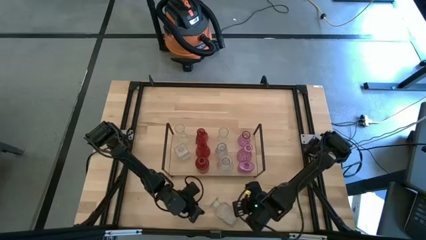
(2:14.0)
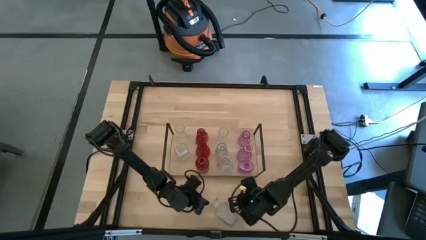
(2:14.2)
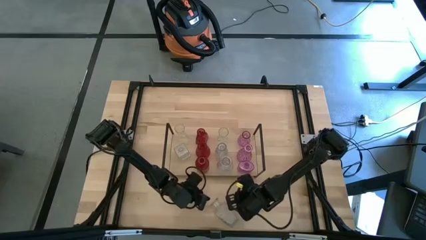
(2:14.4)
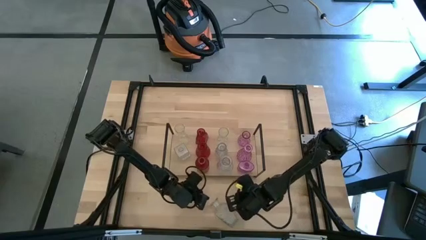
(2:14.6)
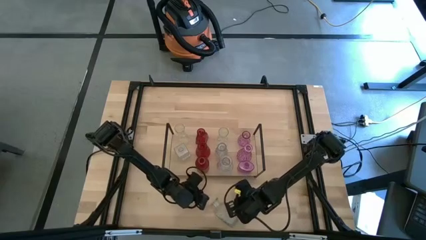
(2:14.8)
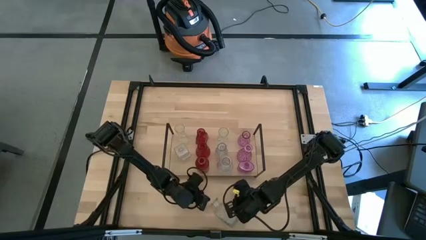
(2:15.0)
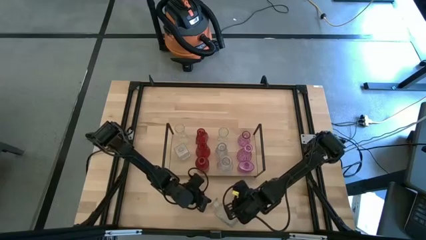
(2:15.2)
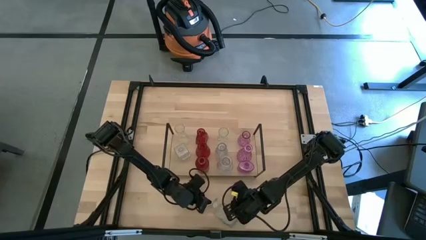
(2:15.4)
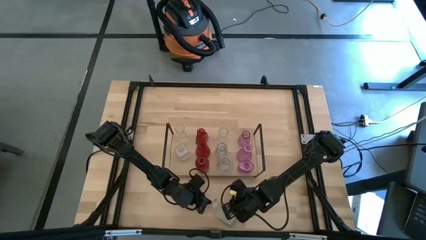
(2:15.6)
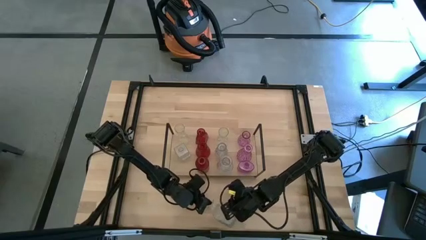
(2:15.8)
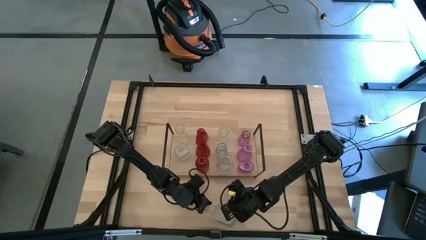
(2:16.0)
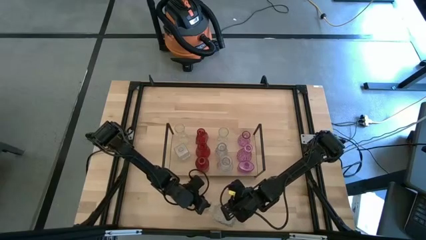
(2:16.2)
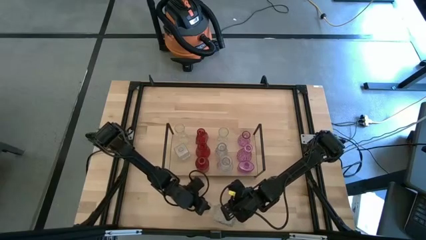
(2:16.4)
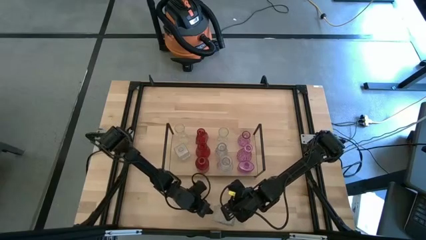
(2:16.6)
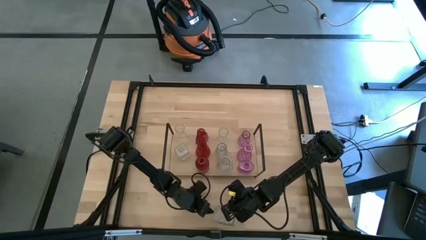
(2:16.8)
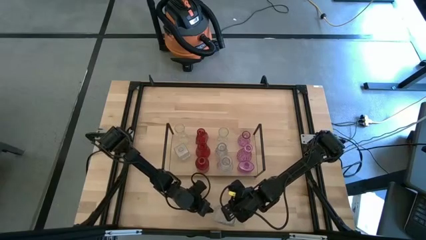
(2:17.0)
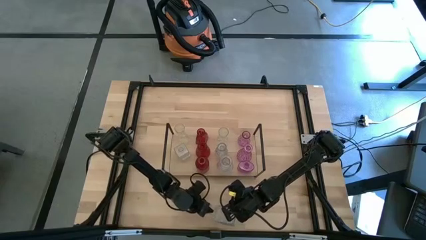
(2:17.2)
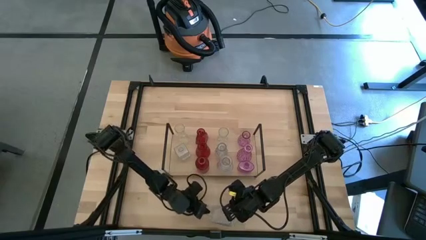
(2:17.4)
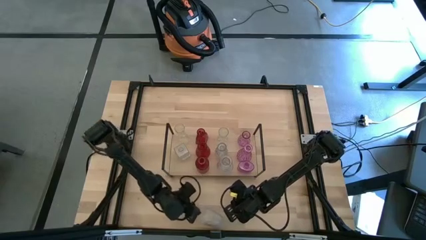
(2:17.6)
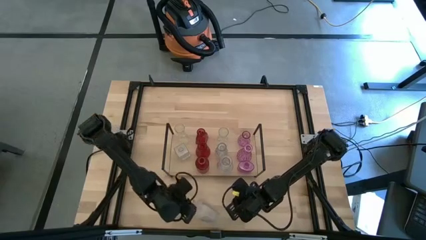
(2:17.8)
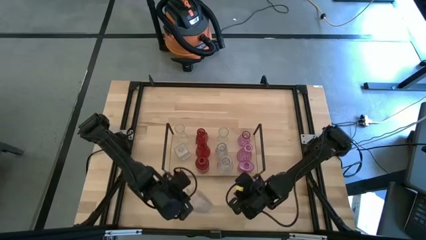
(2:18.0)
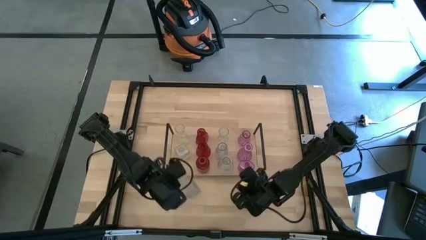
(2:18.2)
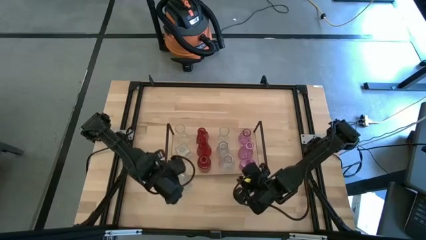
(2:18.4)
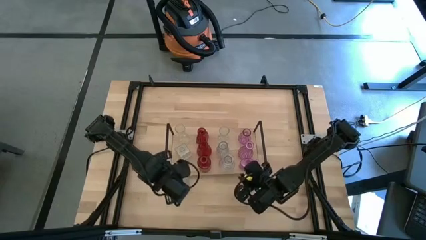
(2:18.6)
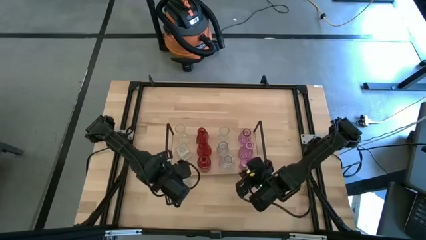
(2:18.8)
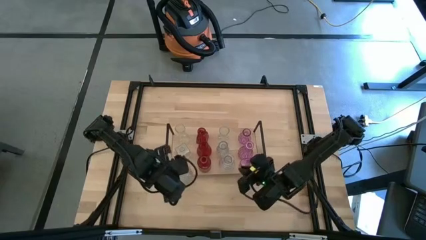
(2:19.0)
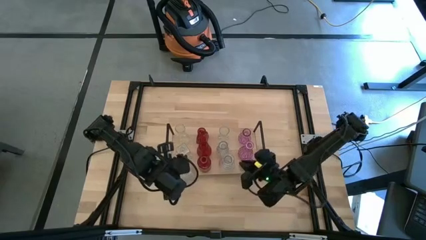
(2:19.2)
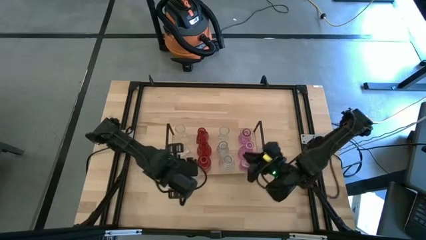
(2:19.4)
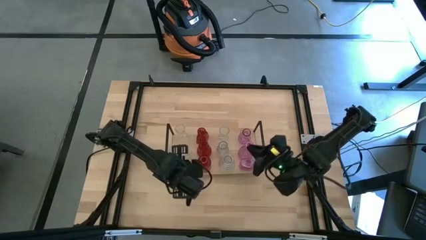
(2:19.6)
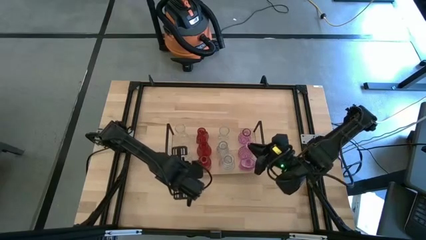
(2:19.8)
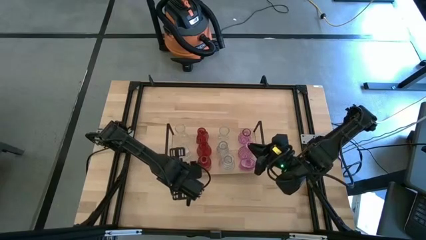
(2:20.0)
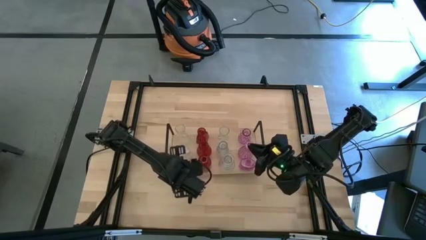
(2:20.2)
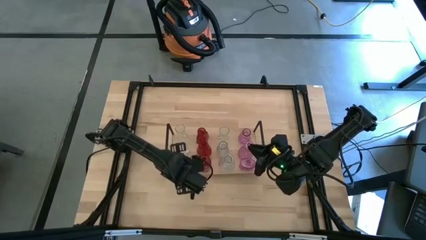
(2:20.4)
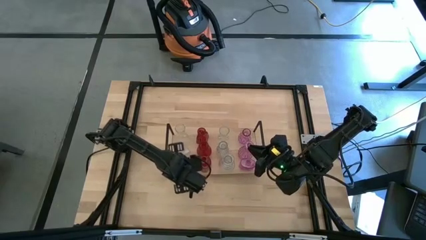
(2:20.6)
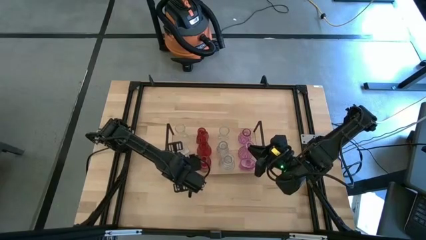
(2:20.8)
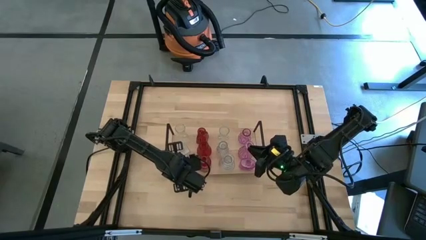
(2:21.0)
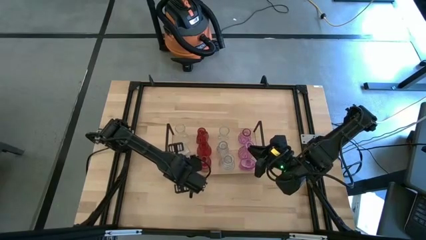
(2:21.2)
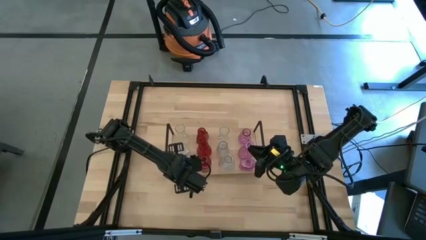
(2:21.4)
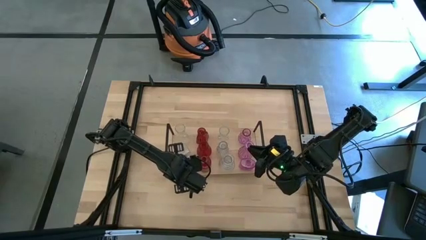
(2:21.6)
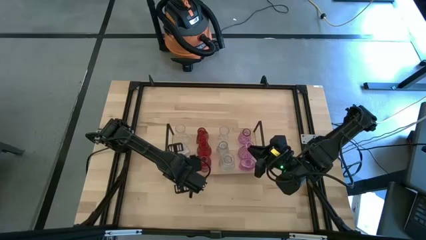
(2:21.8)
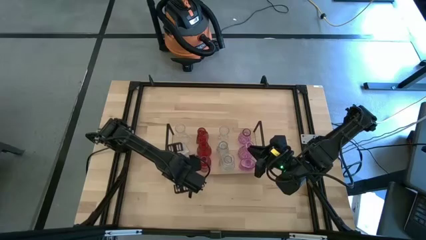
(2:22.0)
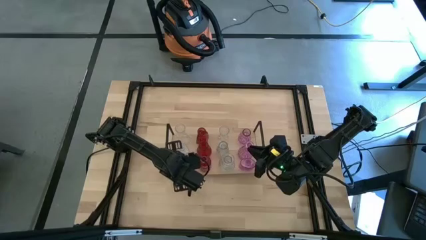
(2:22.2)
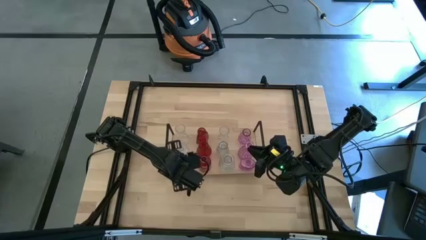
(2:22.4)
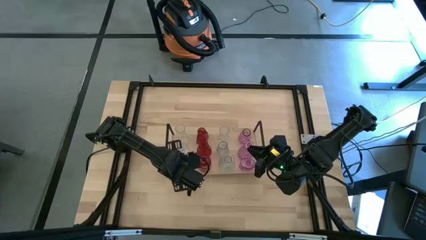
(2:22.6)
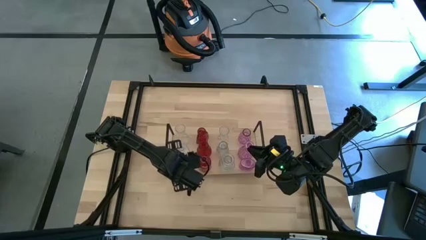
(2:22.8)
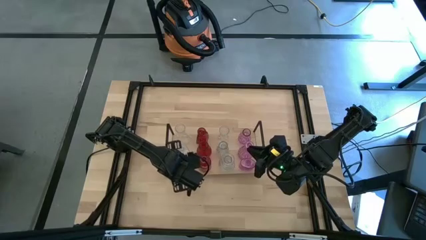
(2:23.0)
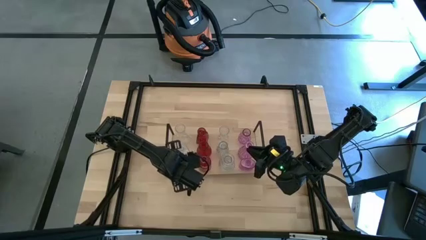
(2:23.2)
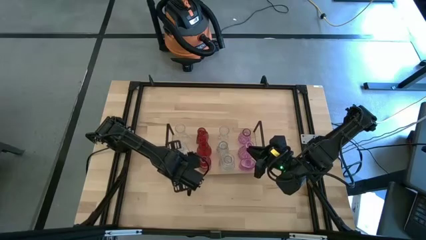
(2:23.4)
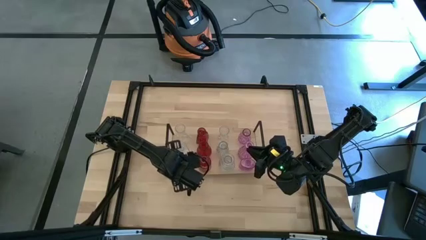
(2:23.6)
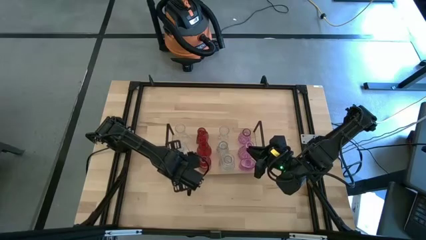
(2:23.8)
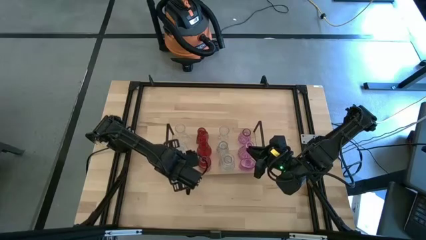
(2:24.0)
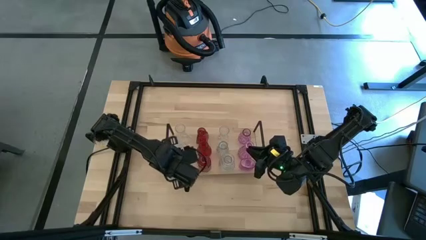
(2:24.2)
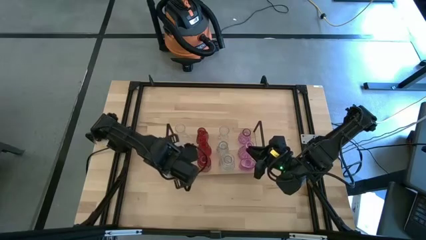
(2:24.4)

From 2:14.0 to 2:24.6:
Task: sort vases onto shelf
Put the transparent flower vase on the shelf aligned with the other transparent flower vase

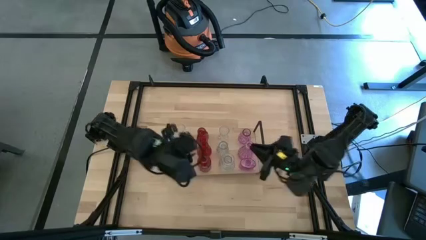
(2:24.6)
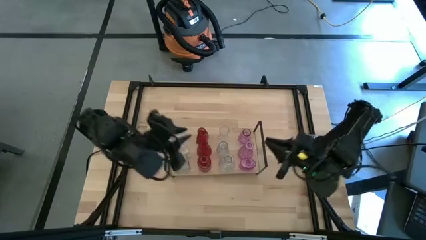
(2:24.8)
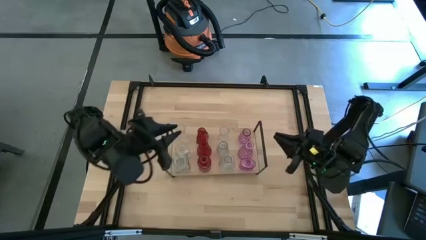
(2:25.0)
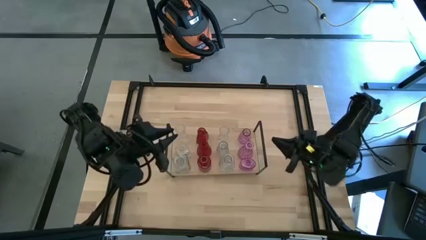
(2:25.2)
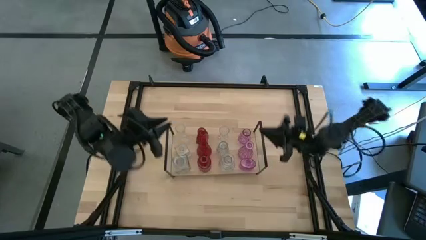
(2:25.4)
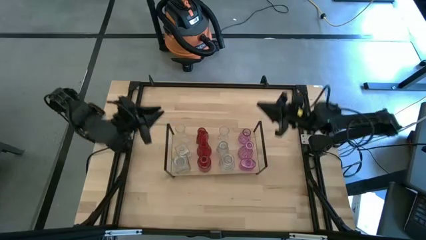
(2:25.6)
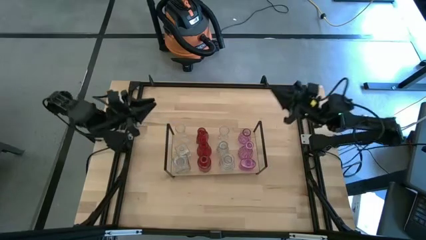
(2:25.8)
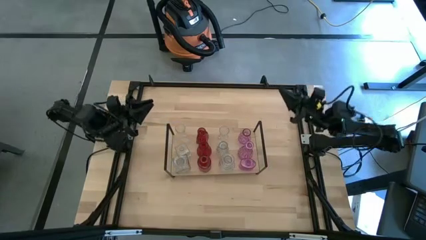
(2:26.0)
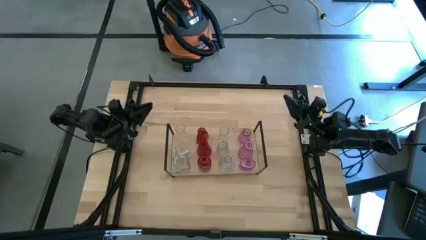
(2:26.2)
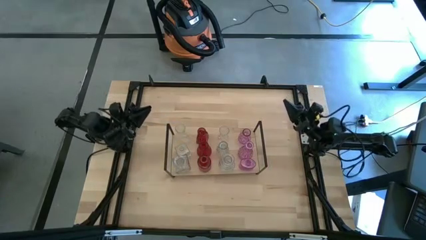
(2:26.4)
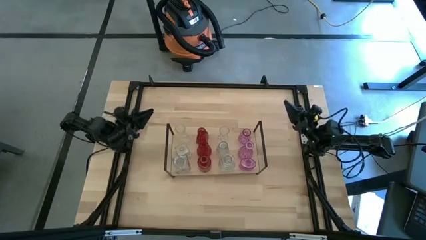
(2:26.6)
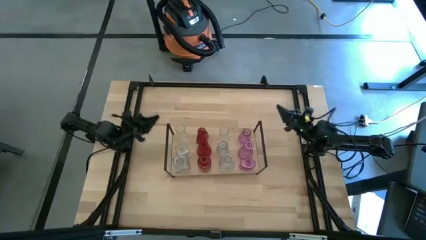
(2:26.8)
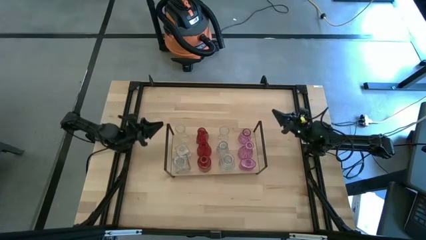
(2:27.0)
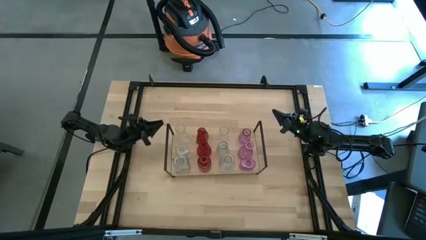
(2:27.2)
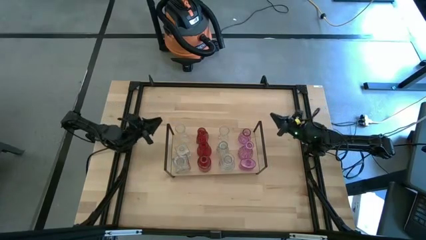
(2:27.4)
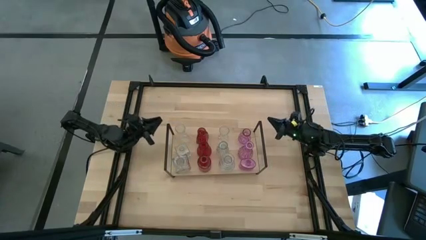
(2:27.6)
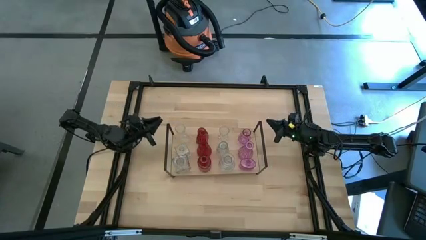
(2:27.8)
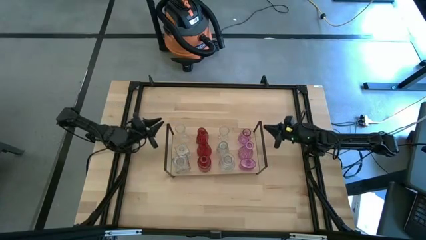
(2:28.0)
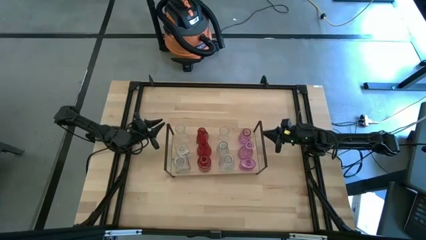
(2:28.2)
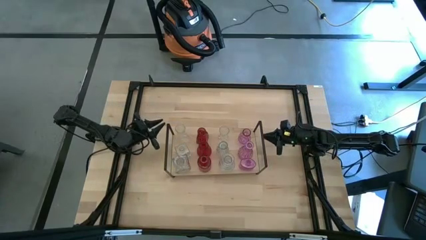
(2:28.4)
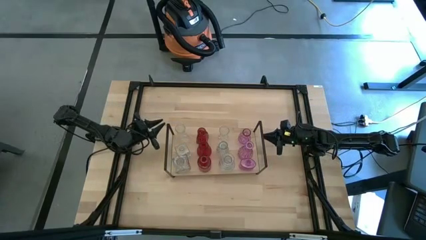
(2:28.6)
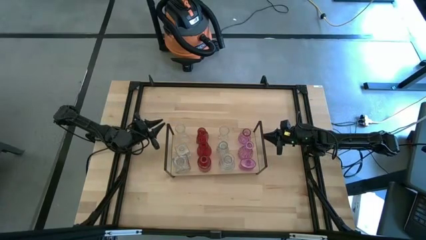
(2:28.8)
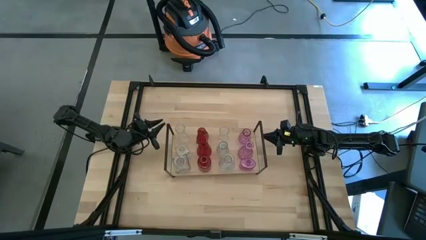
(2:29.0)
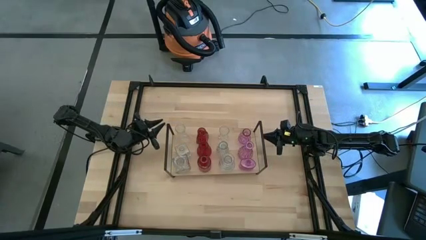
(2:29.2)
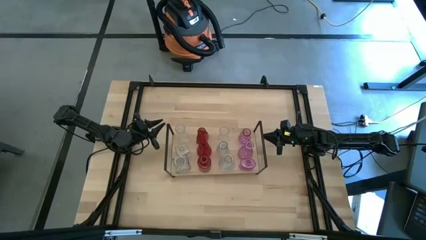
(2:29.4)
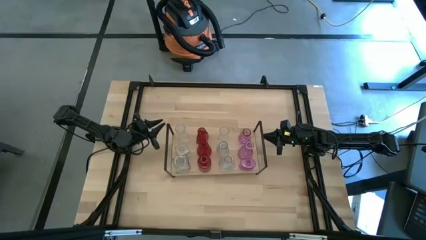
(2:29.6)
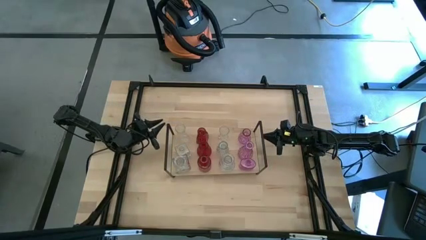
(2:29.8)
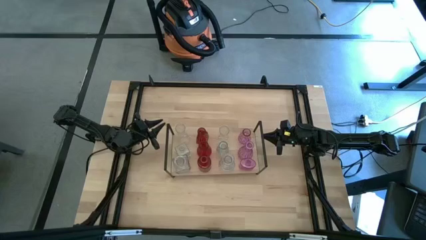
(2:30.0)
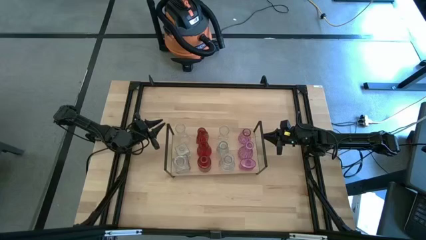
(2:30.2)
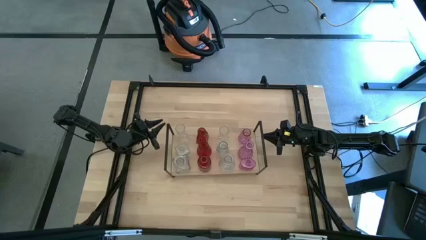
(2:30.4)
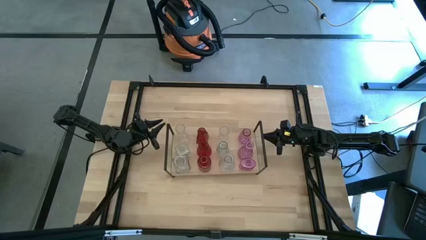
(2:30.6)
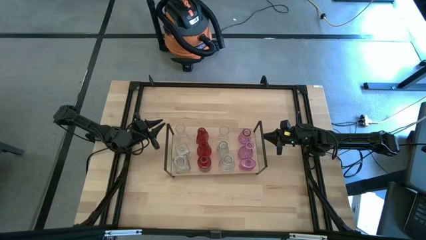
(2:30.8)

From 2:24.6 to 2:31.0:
Return to Home Position
